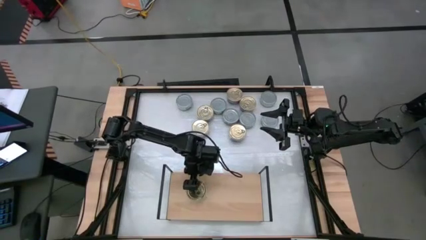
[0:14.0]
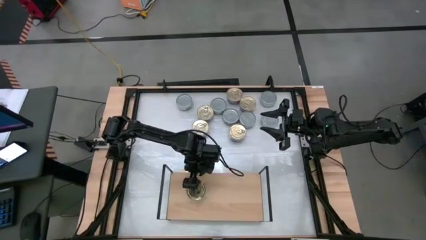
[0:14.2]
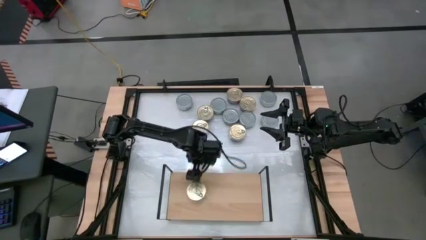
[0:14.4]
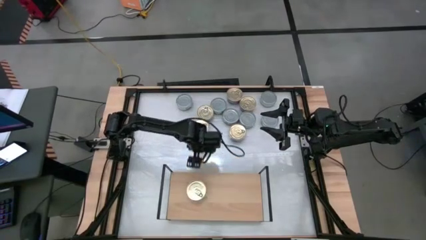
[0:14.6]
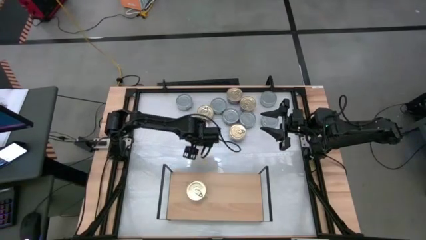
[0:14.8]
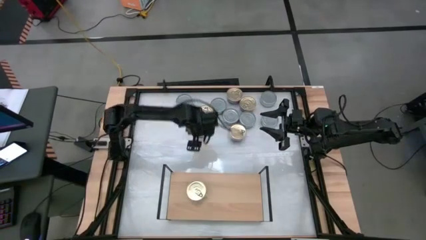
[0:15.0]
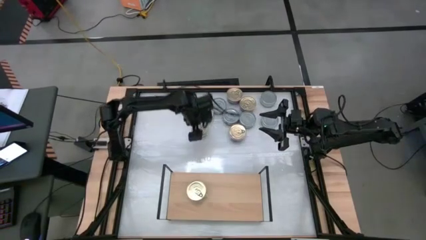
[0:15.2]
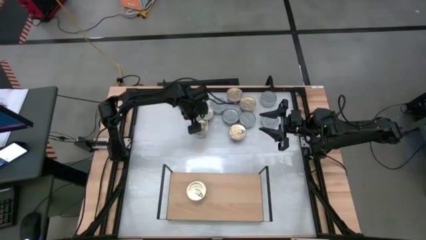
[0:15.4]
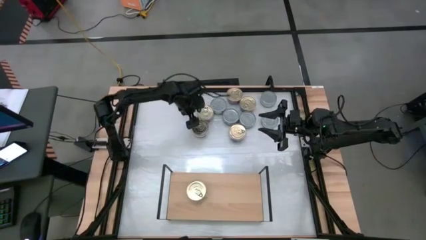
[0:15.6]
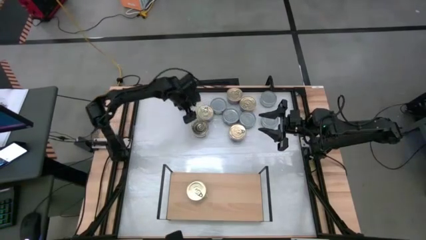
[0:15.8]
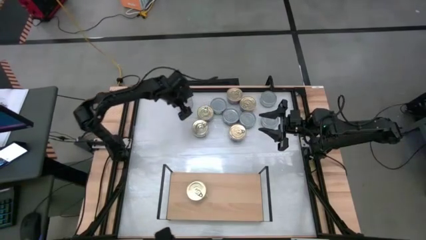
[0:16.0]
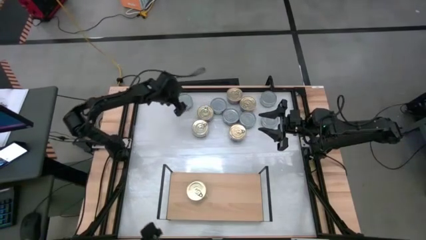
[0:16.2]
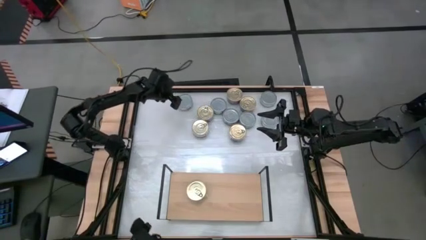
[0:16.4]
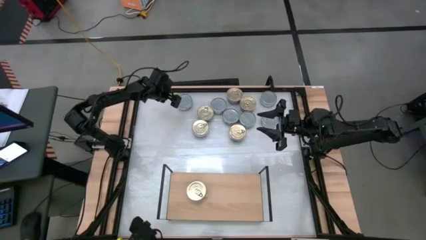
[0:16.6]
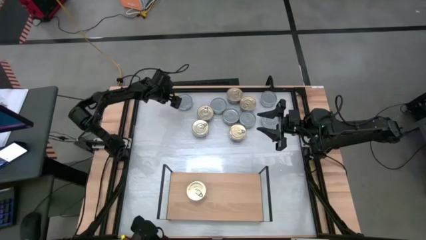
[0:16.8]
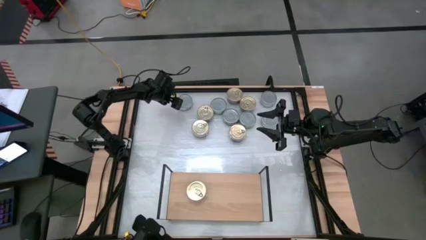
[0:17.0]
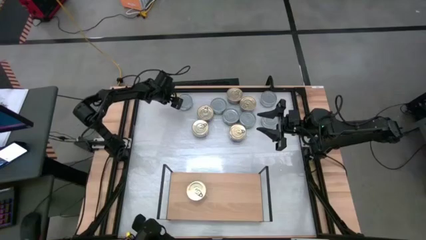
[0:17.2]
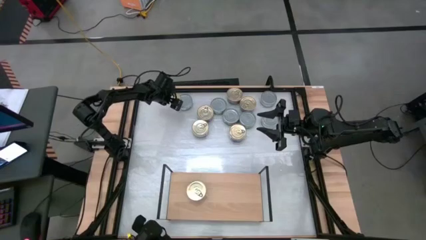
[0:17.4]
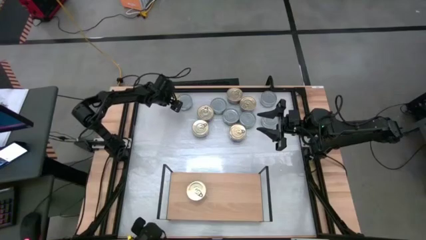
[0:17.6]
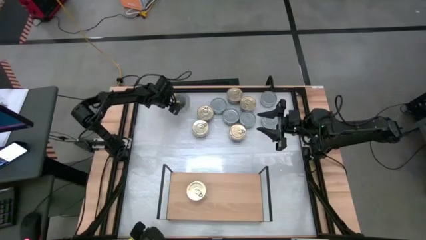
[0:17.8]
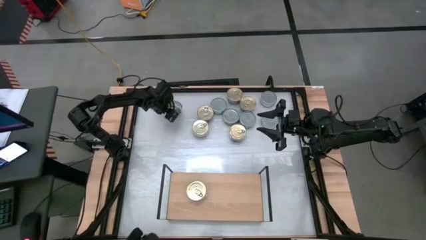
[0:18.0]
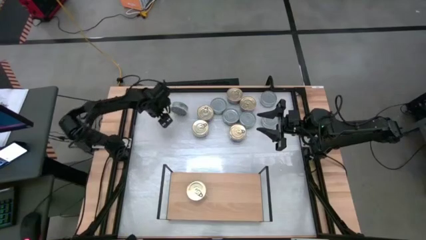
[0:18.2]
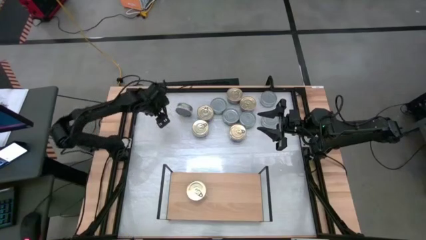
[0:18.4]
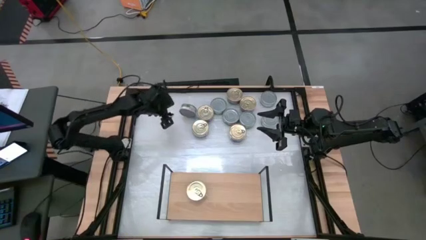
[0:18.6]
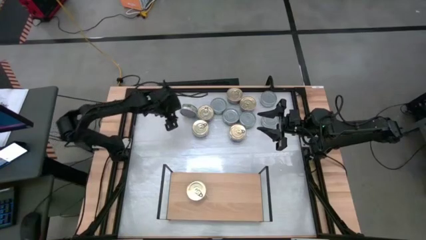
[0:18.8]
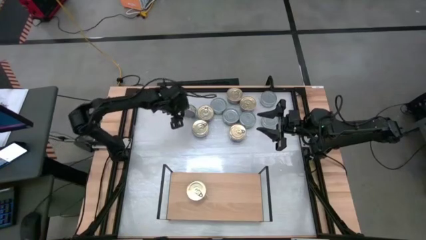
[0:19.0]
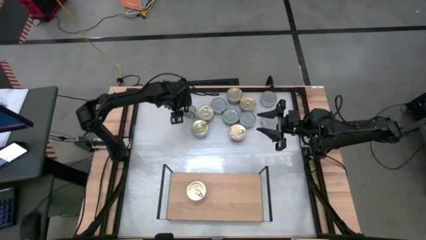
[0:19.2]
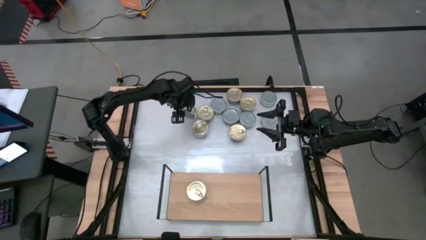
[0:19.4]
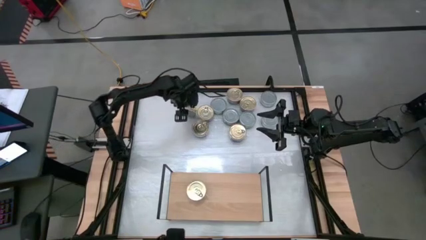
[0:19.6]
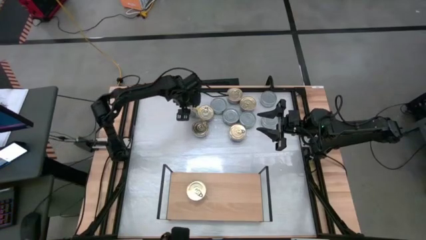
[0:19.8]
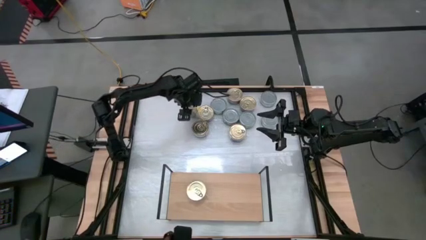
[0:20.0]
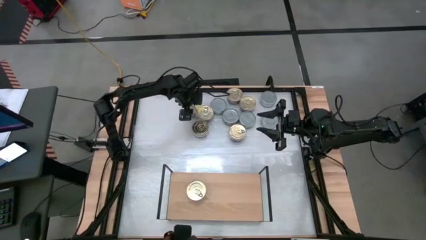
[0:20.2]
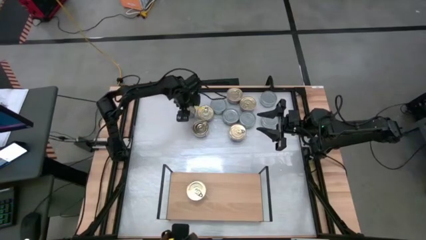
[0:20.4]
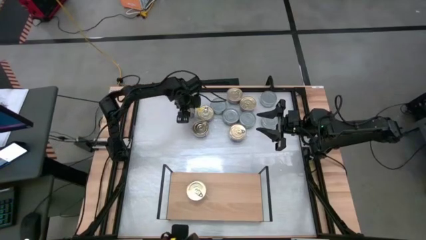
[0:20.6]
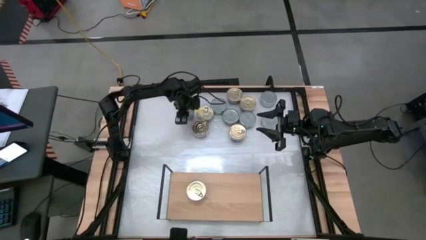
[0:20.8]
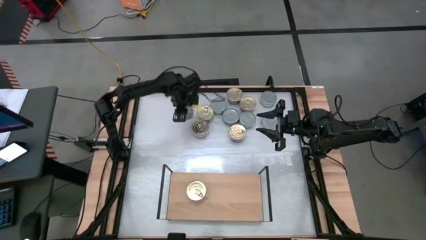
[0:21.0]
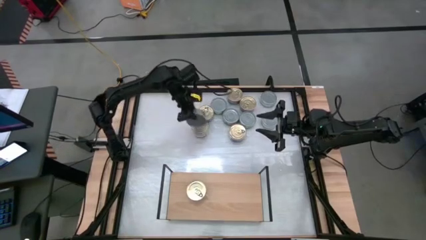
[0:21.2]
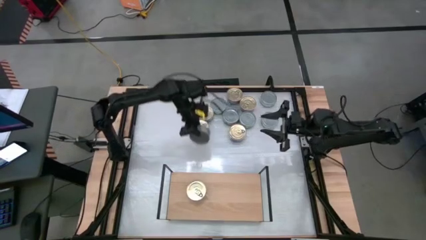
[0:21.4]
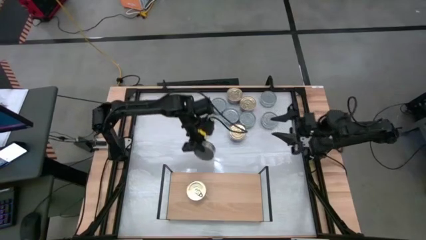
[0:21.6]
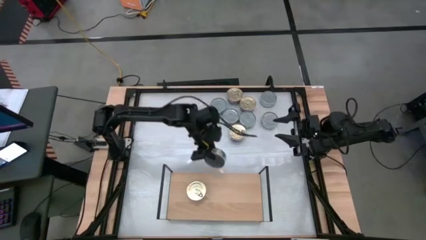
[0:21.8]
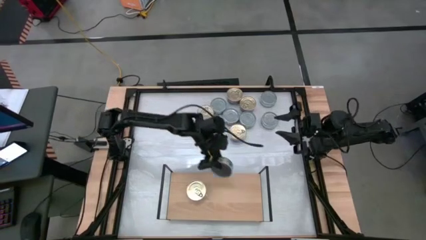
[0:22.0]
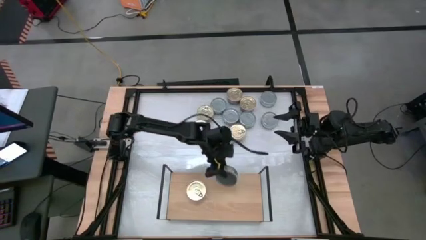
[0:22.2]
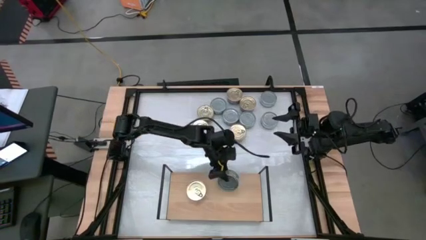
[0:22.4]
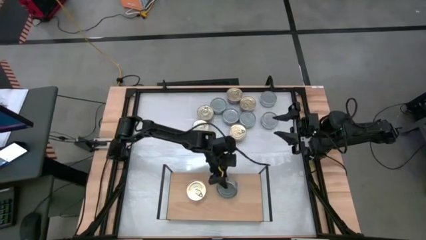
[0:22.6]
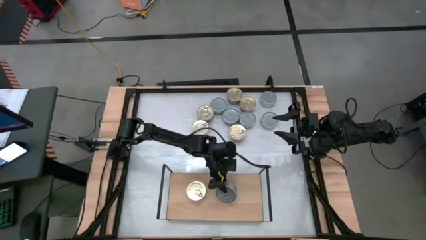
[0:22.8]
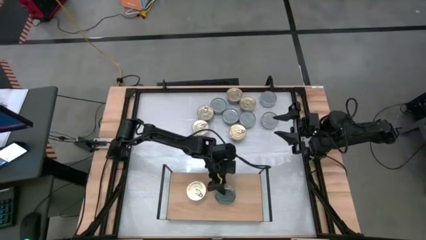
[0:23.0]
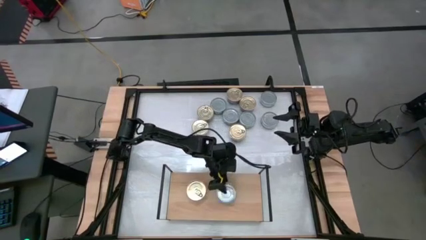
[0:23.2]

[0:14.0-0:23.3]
Task: Stack canned seafood by type on shelf
Put the green tuna can on the shelf
